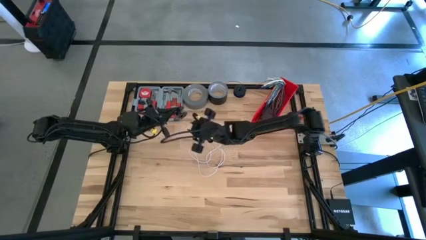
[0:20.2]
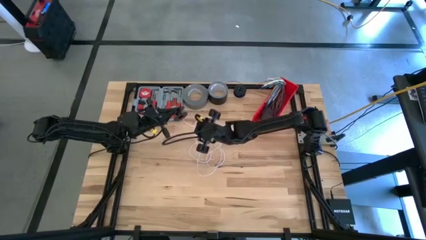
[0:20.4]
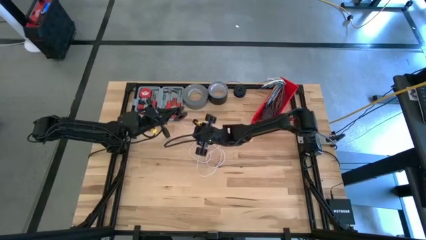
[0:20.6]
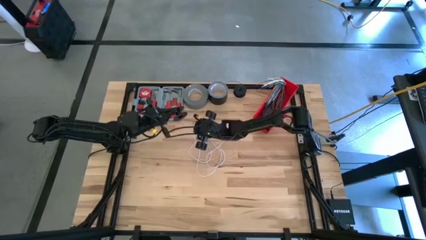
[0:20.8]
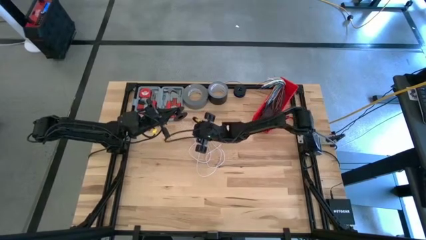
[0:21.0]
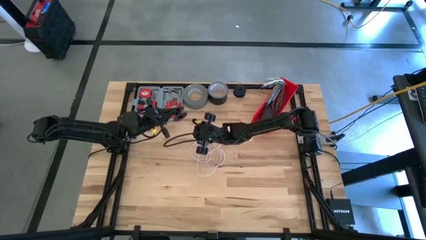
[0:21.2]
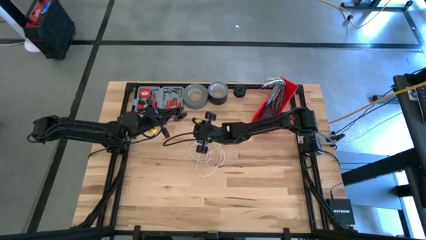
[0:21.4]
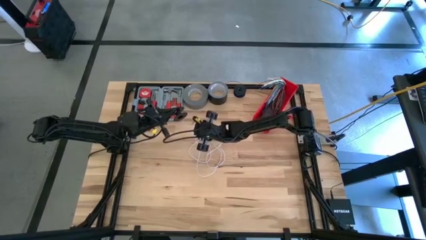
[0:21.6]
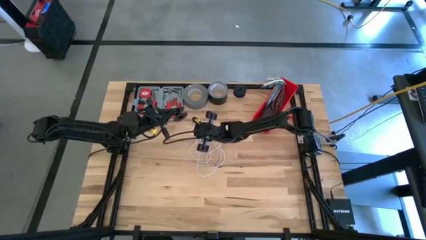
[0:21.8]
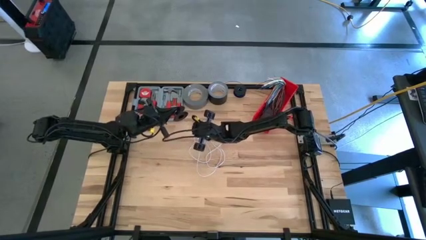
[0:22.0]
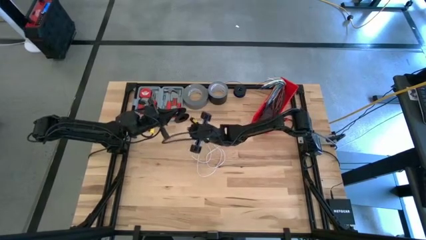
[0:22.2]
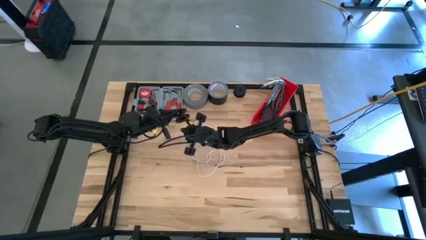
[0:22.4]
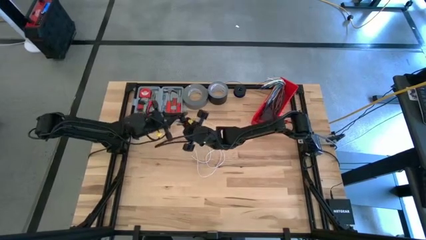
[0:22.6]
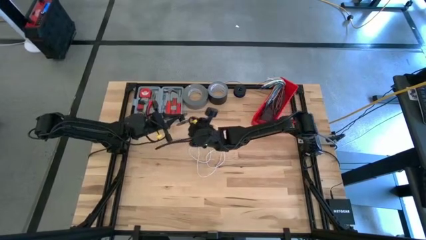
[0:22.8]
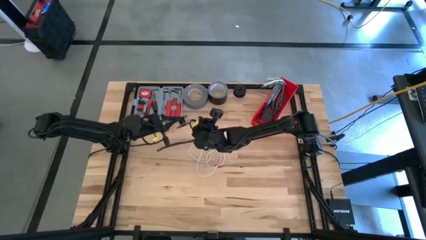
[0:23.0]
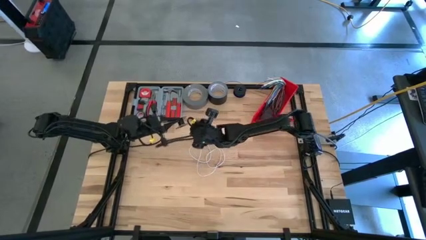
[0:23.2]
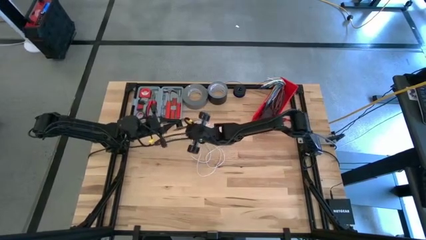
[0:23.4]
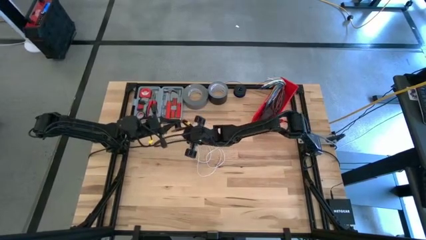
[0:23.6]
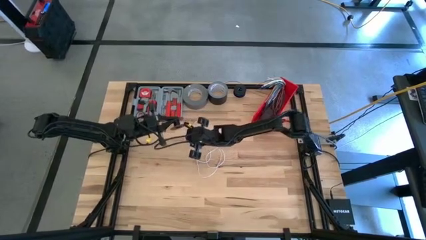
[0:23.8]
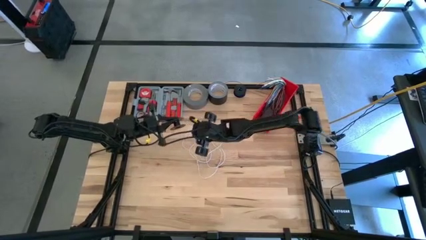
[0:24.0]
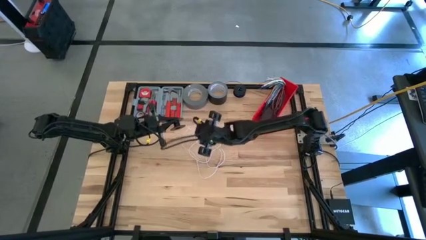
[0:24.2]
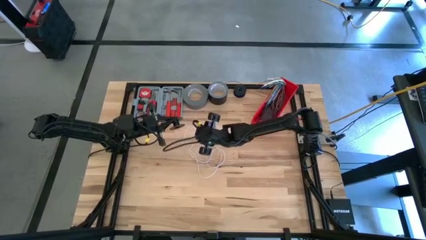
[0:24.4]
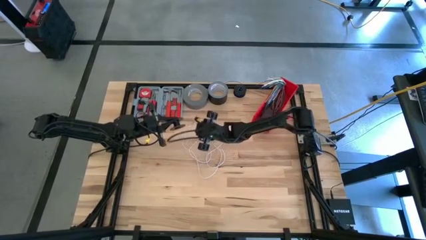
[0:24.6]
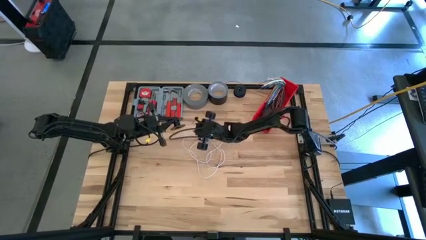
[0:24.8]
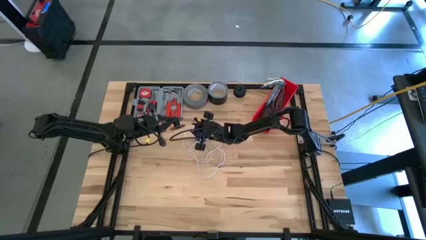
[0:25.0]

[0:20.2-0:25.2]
Task: Coil cords
Coil the white wire on the black spool

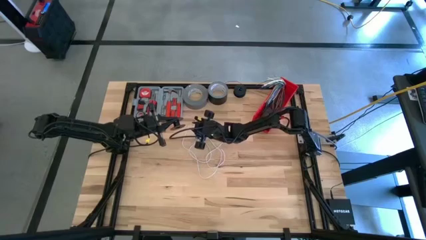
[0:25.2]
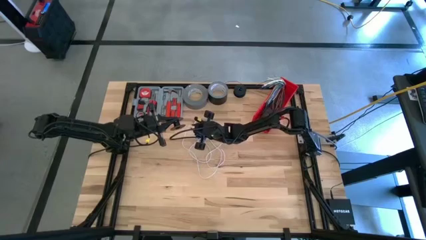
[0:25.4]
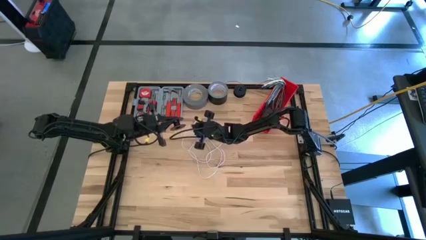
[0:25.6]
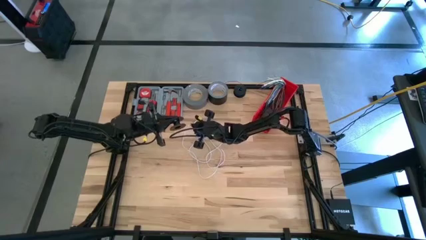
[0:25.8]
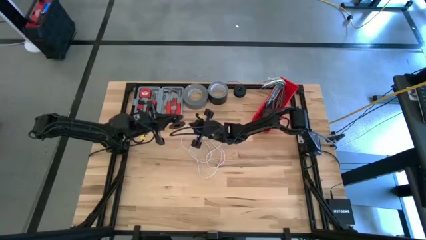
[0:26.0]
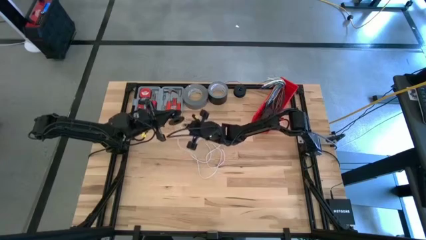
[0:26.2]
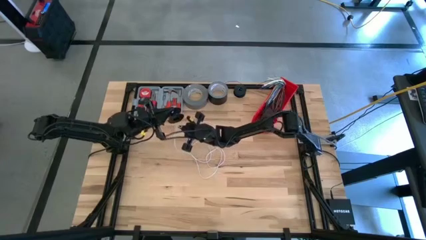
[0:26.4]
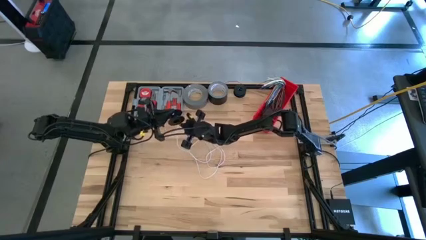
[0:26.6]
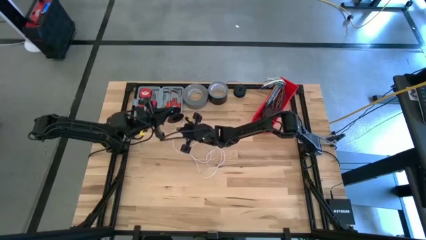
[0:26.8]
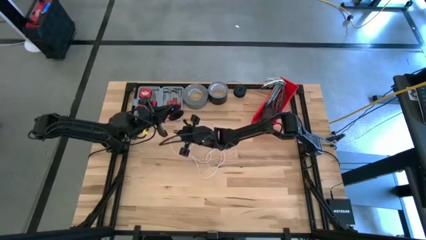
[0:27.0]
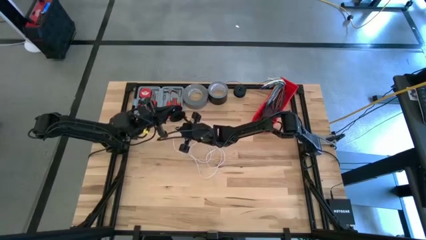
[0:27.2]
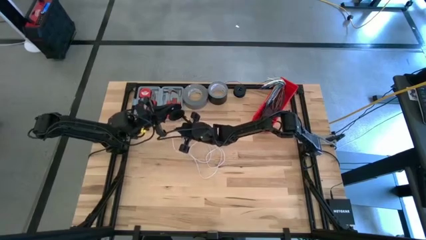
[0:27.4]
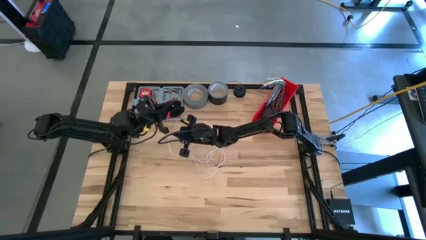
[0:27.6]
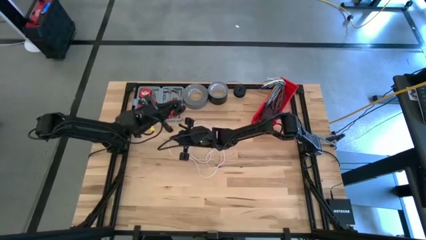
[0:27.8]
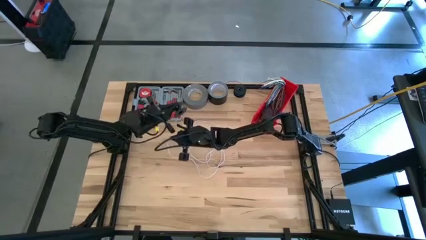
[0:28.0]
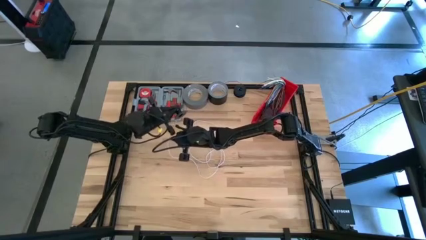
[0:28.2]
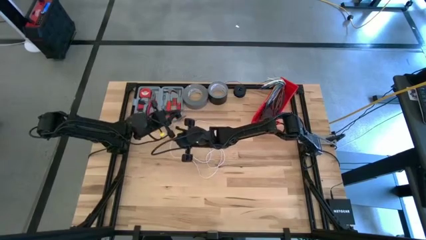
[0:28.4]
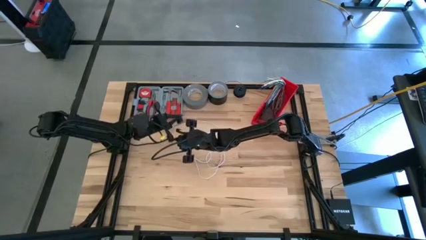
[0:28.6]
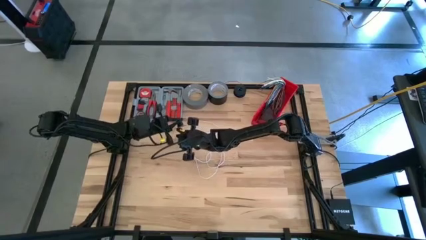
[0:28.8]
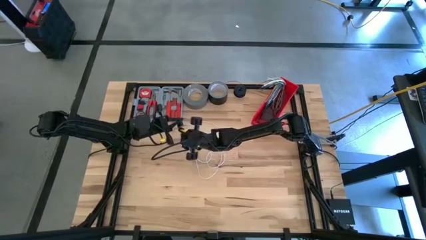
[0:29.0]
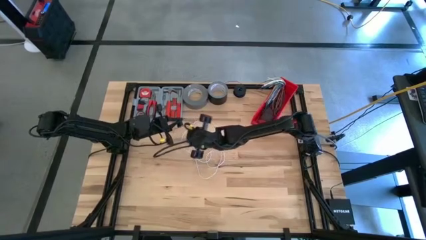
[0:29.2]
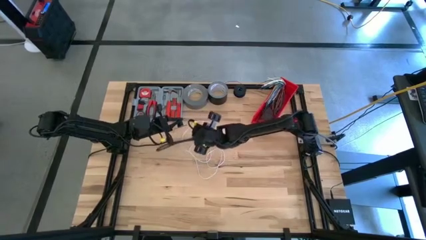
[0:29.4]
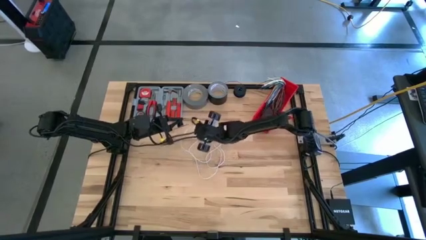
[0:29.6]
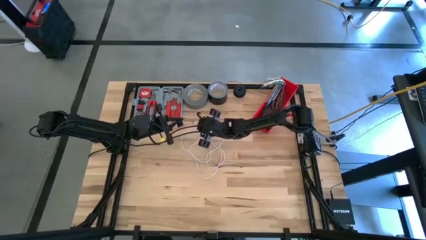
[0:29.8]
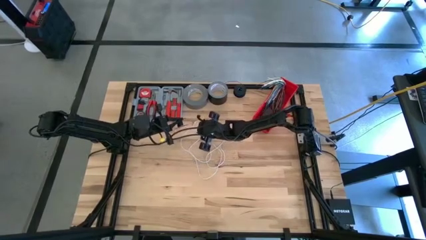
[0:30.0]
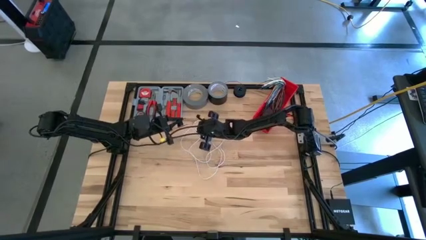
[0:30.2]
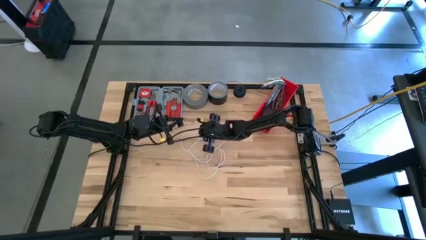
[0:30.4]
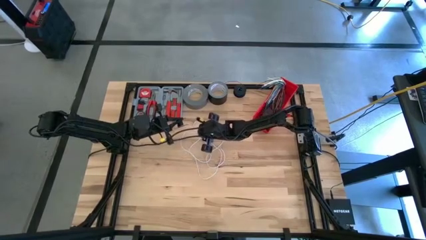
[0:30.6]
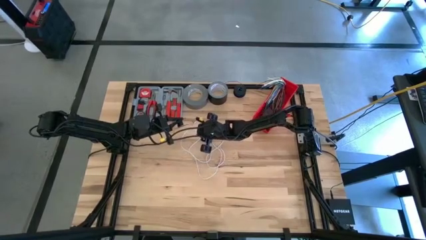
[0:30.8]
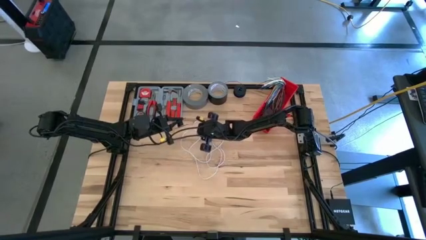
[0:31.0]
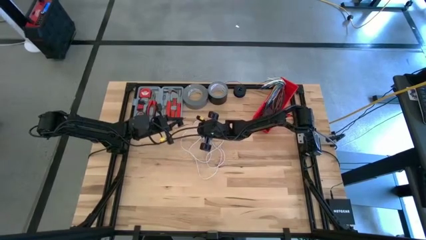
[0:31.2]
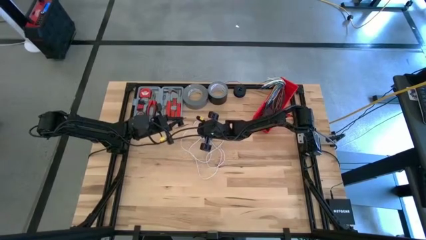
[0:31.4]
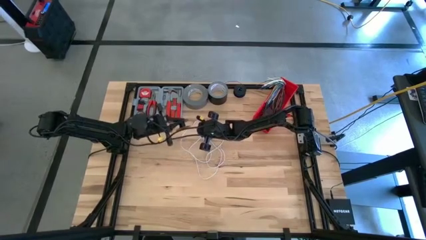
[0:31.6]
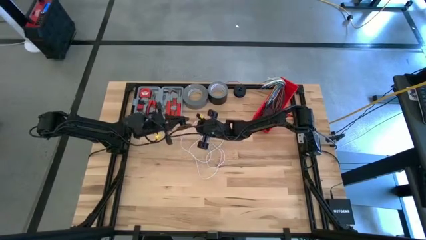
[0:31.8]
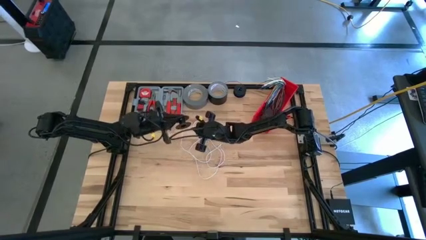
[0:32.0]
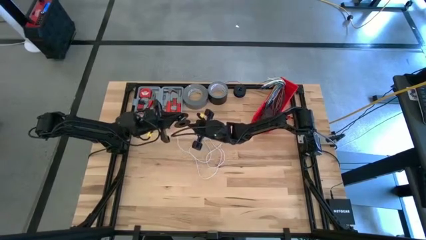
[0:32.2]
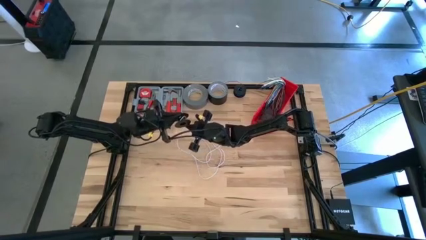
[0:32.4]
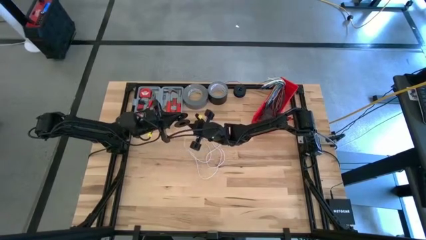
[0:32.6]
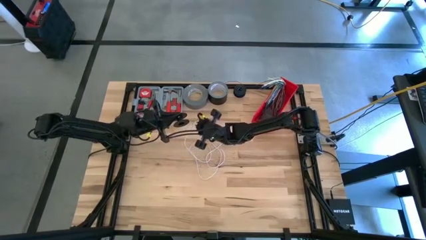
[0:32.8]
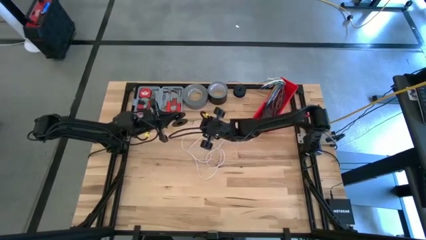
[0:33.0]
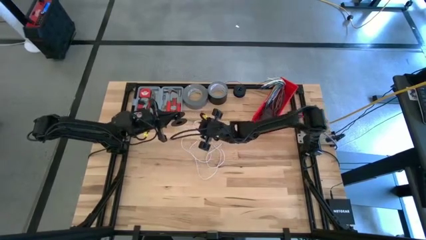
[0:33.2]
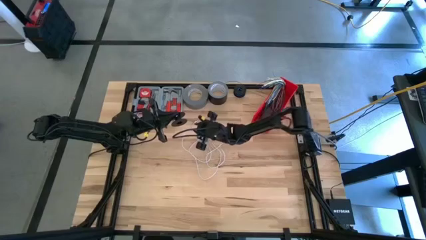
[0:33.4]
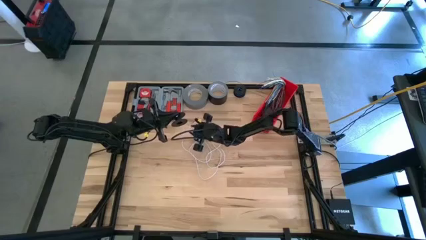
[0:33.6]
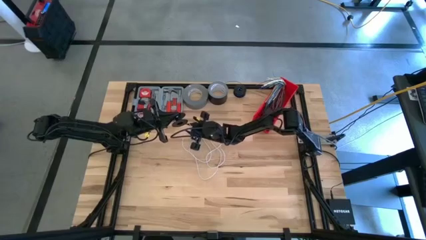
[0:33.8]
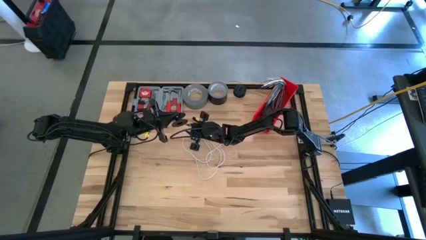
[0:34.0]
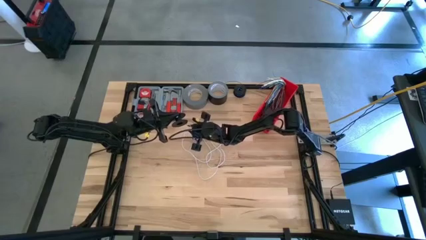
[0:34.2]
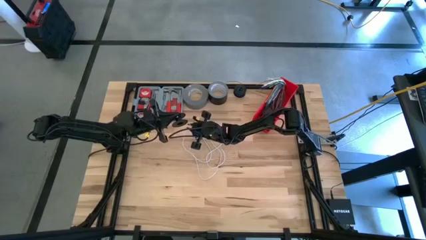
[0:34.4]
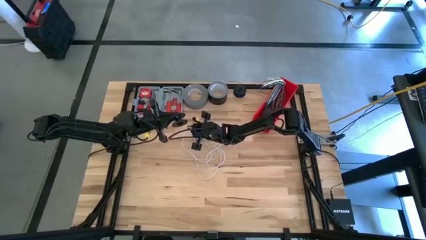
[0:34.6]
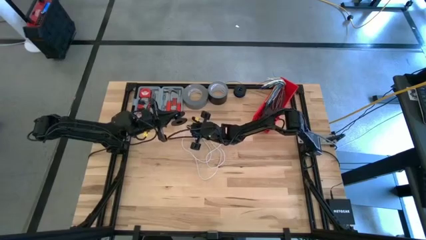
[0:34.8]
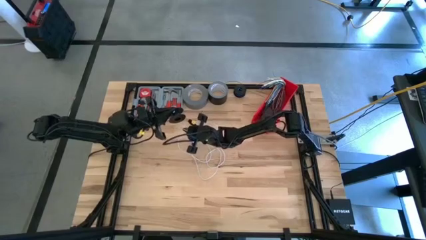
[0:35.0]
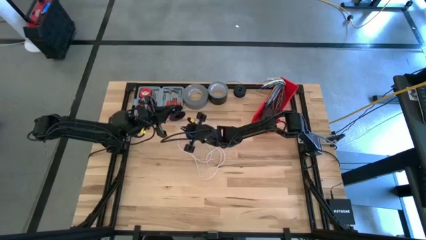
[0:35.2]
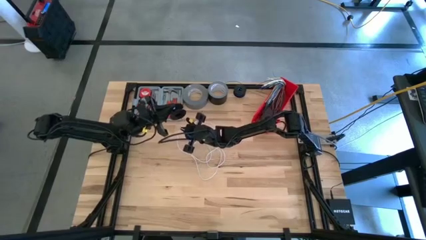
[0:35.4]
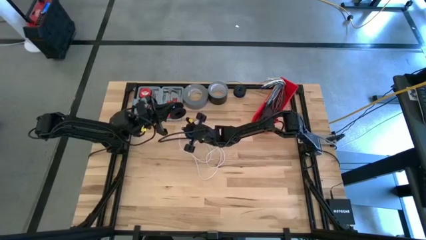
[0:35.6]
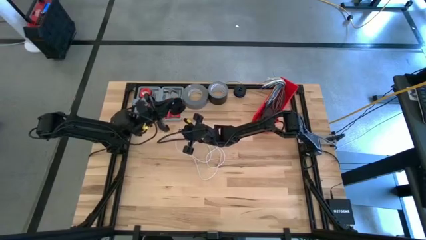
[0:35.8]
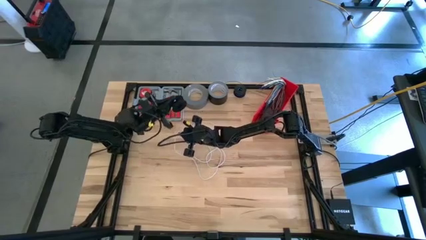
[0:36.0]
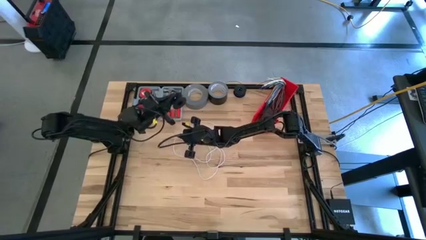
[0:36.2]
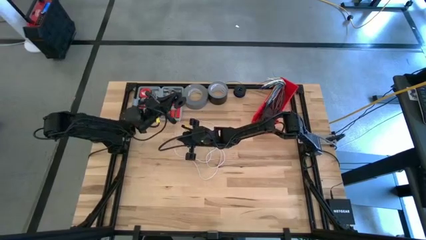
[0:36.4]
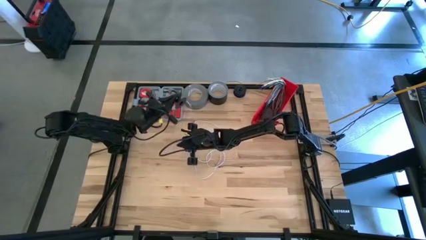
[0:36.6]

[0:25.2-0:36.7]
Coil the white wire on the black spool
